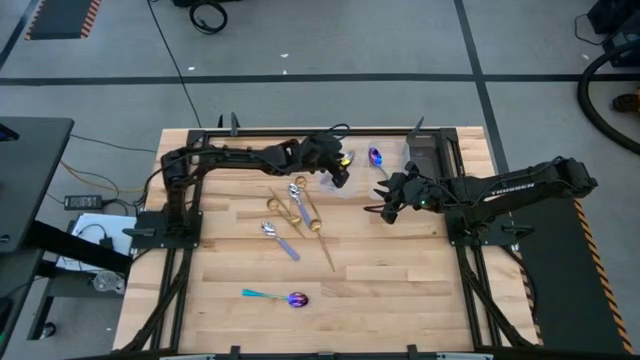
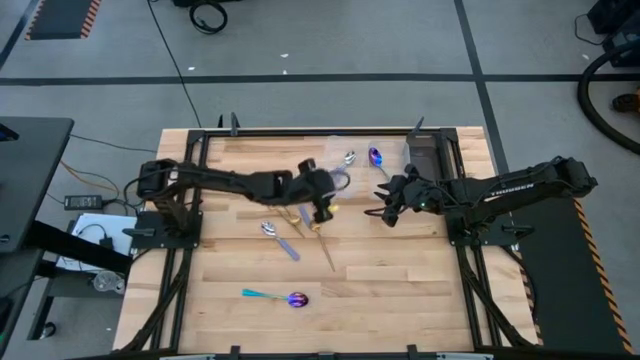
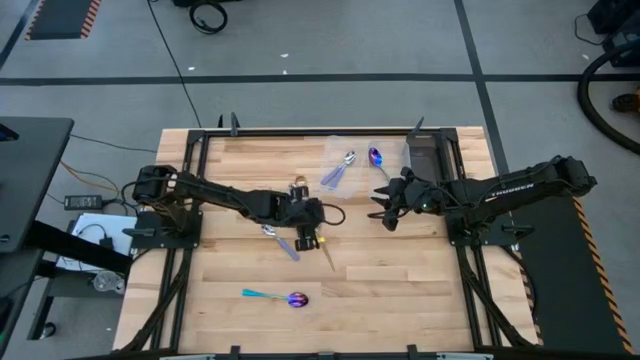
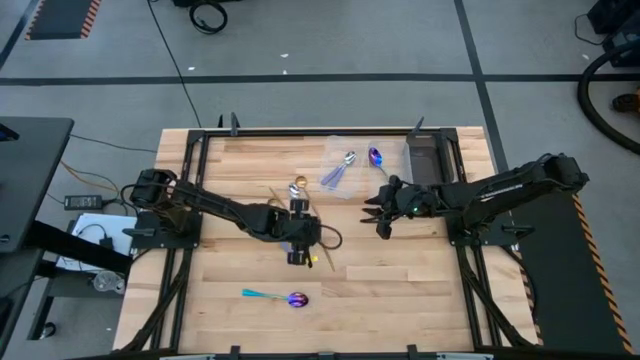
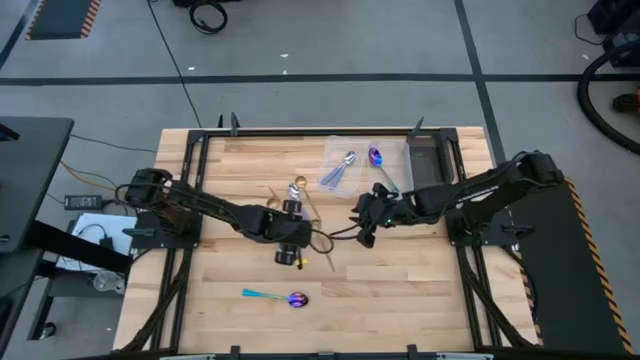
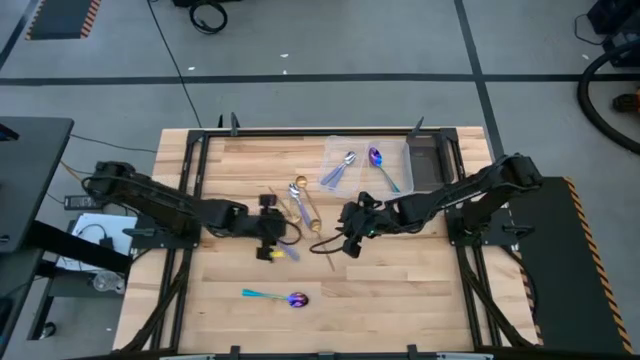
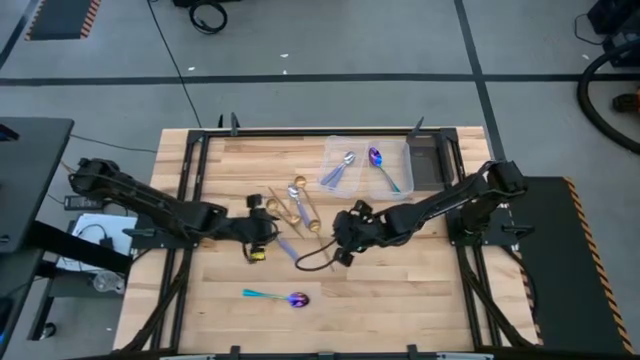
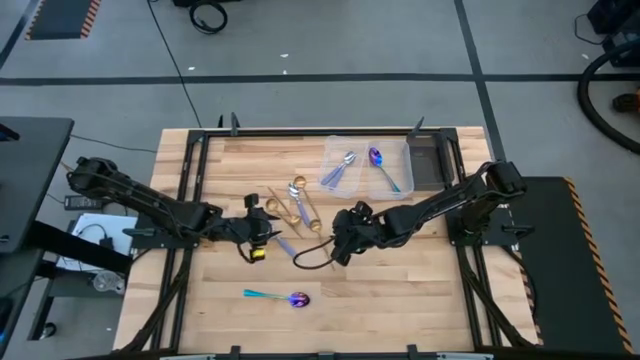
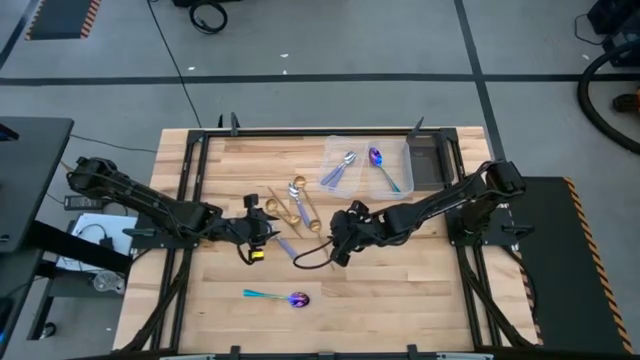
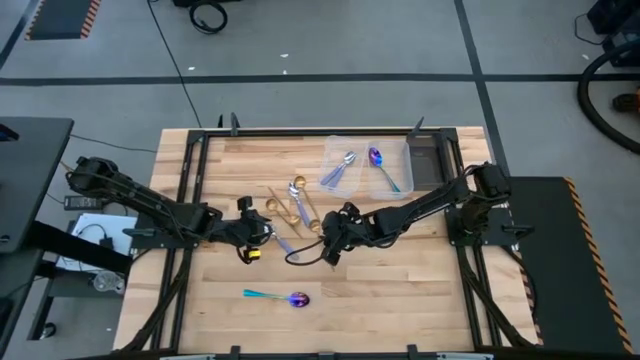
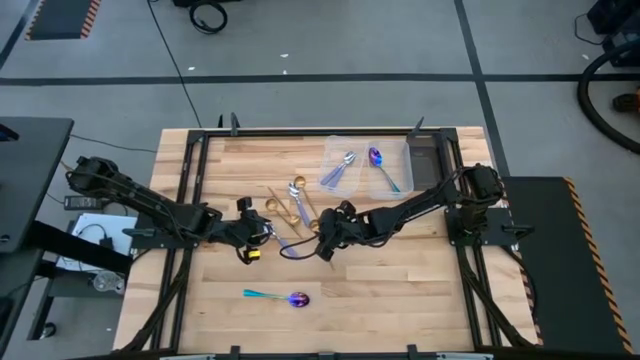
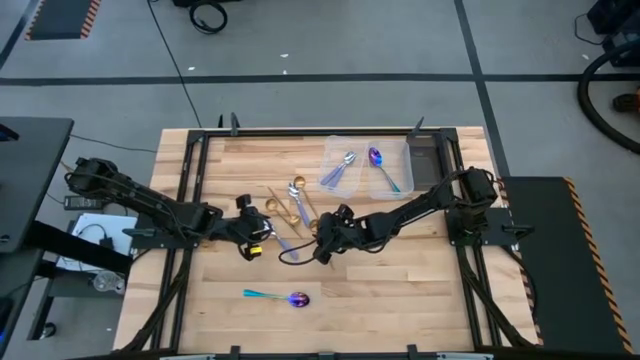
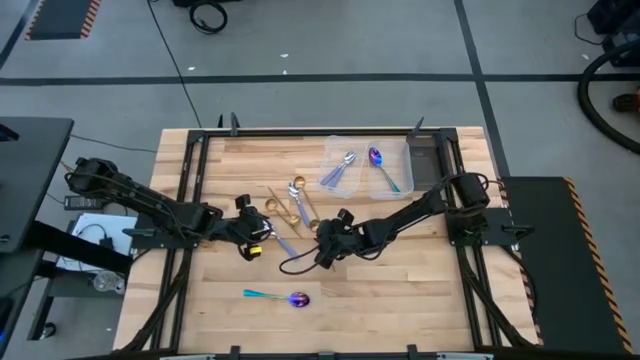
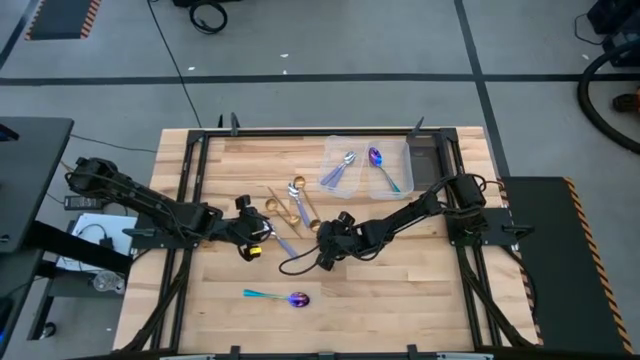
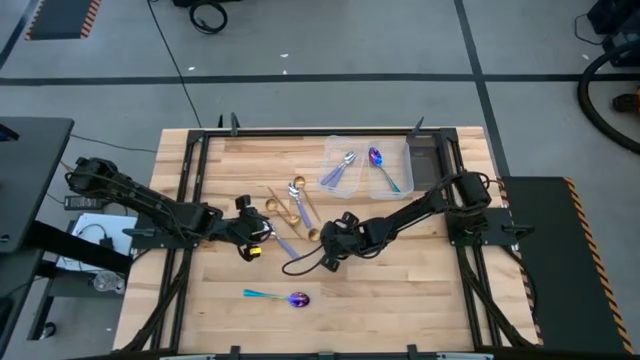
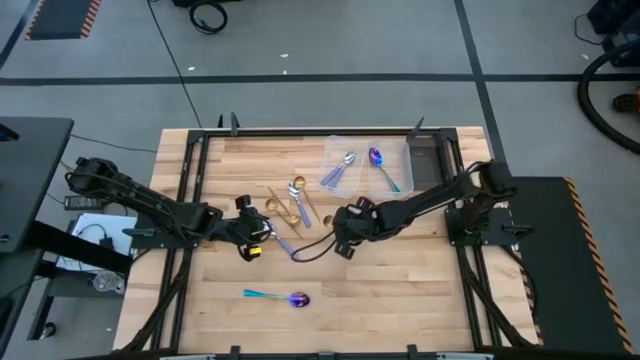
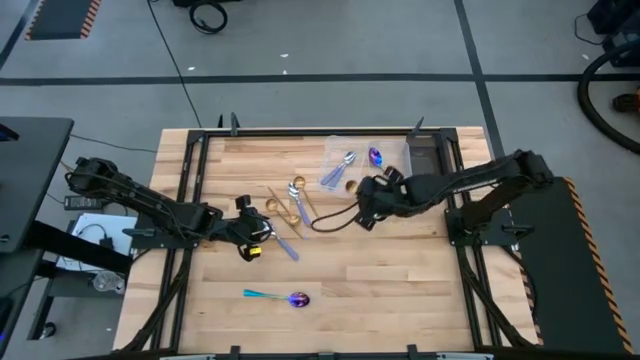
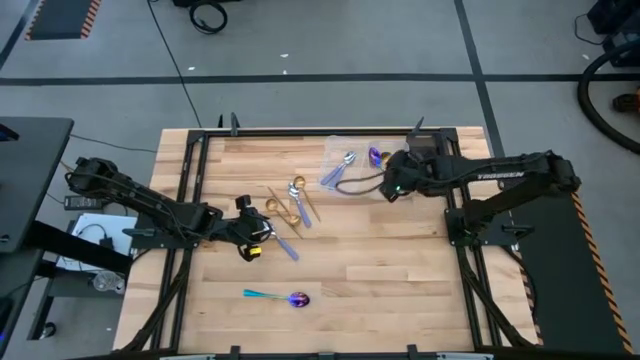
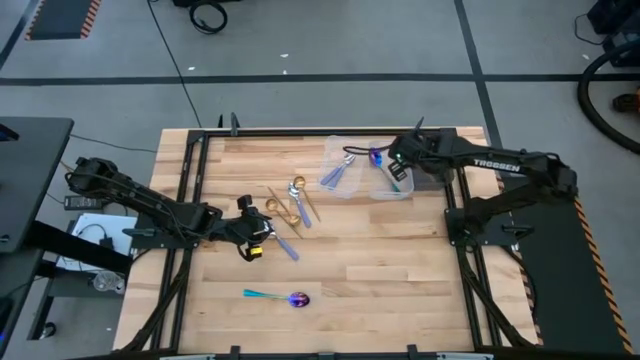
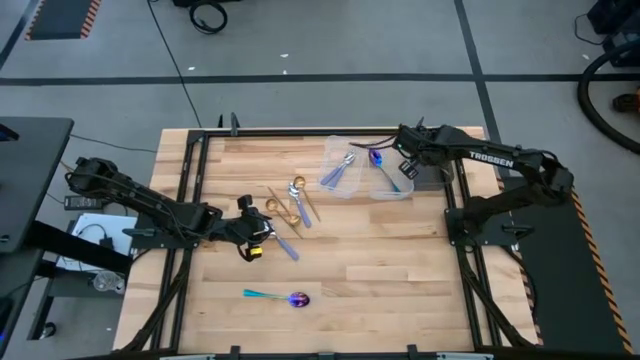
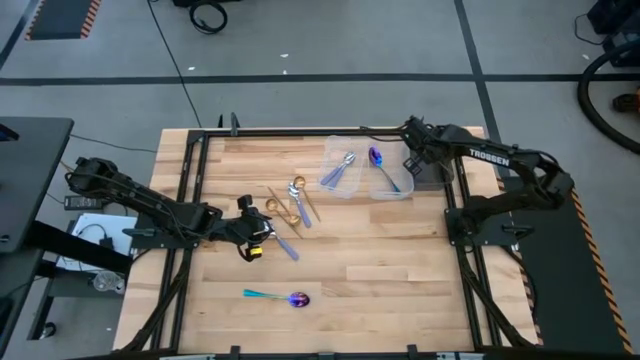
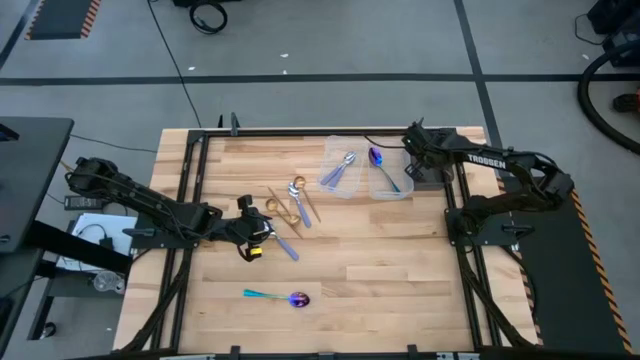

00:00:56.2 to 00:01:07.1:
Task: Sort silverware by color (type)
Put the bottom right golden spoon into the black bin

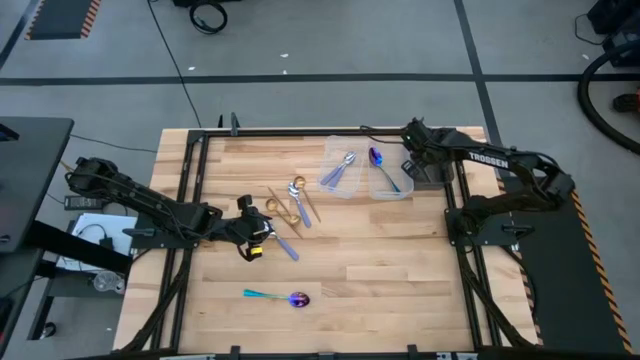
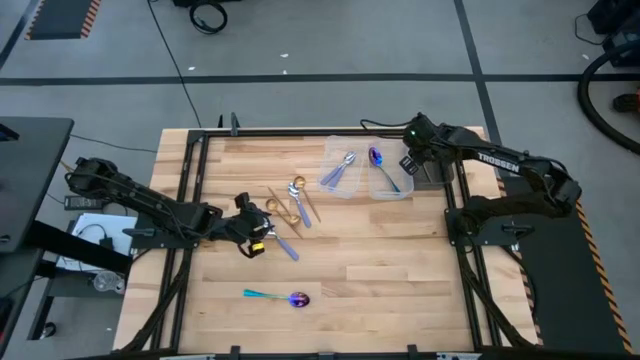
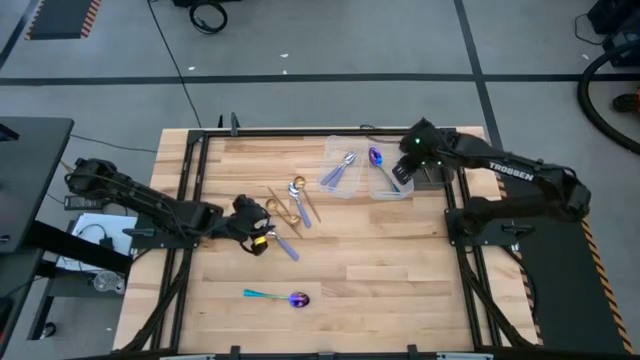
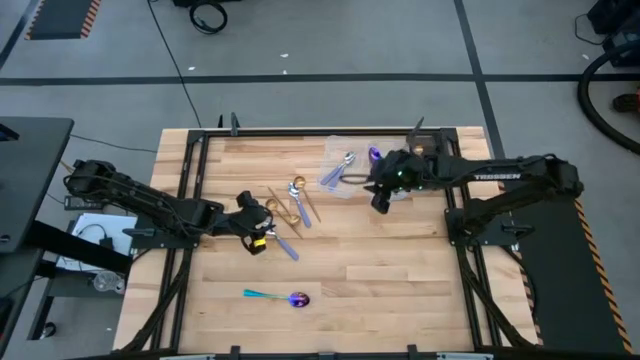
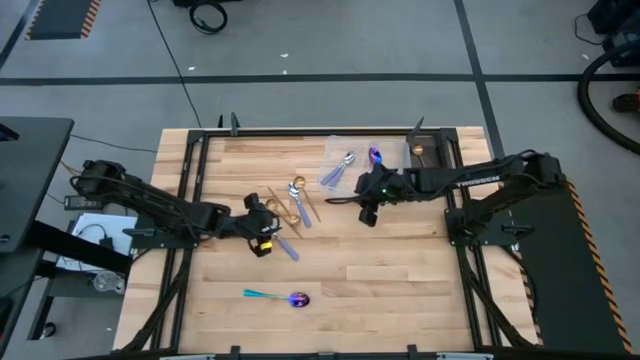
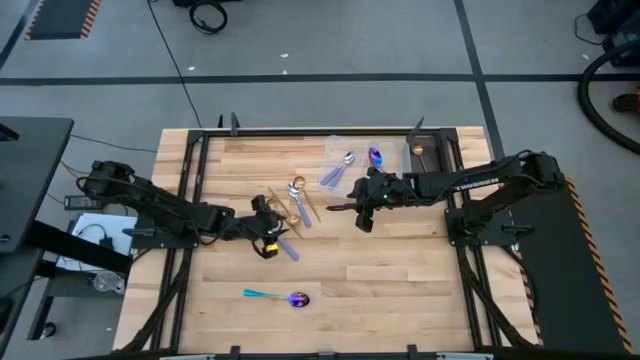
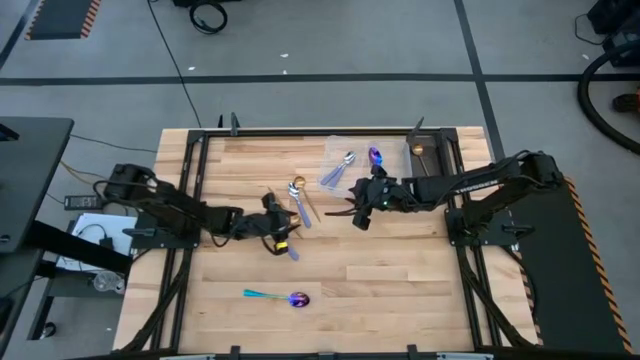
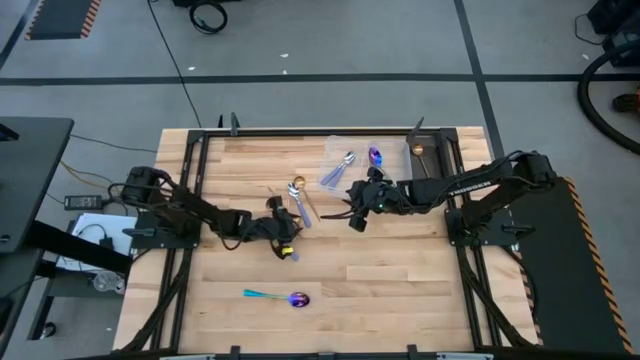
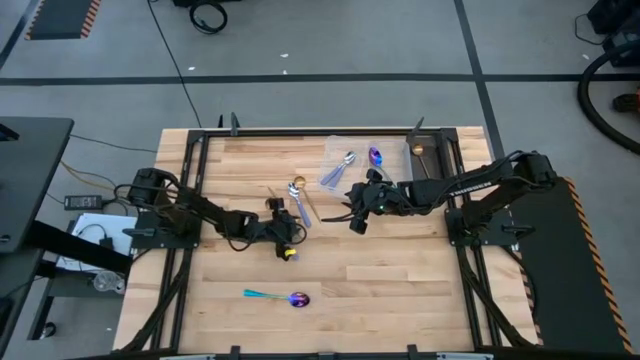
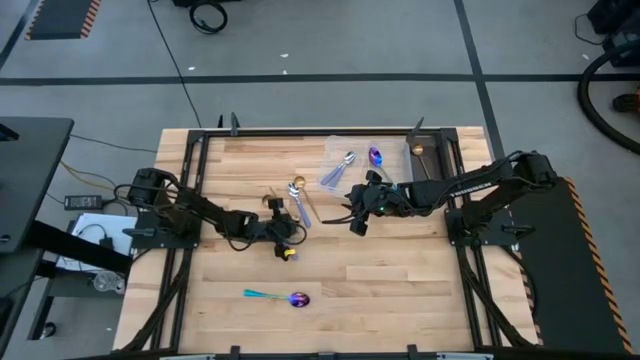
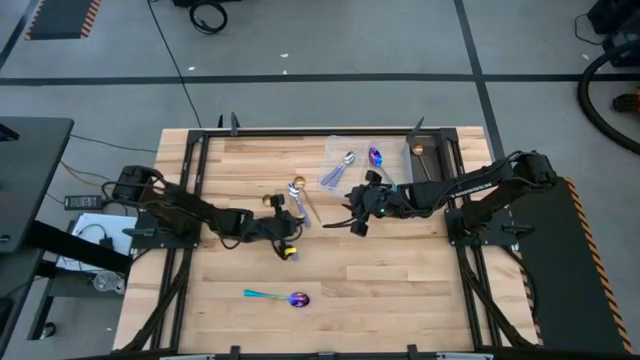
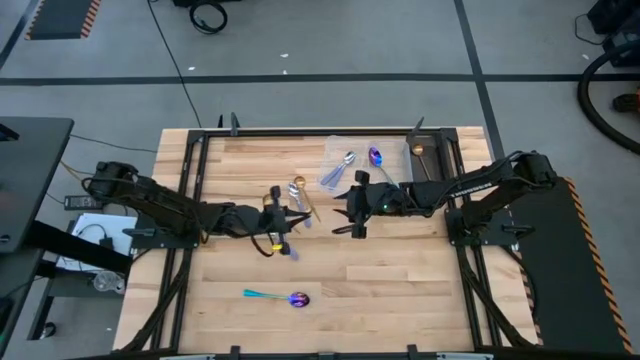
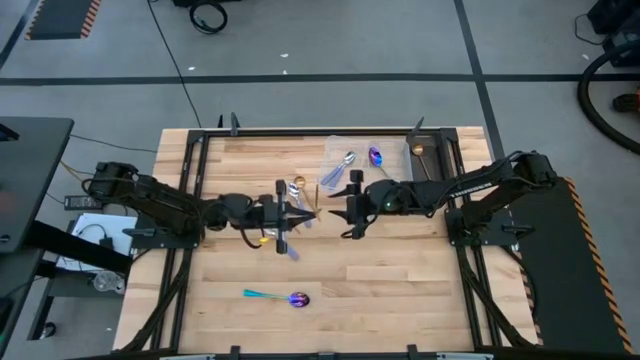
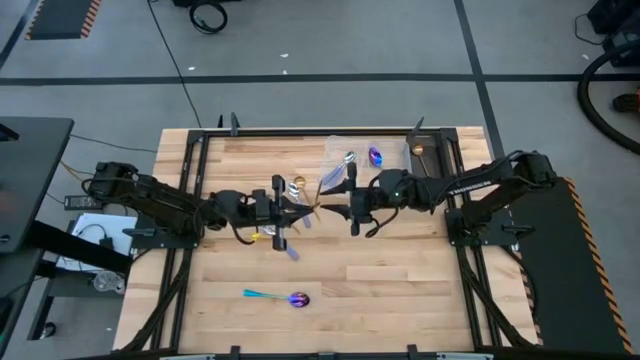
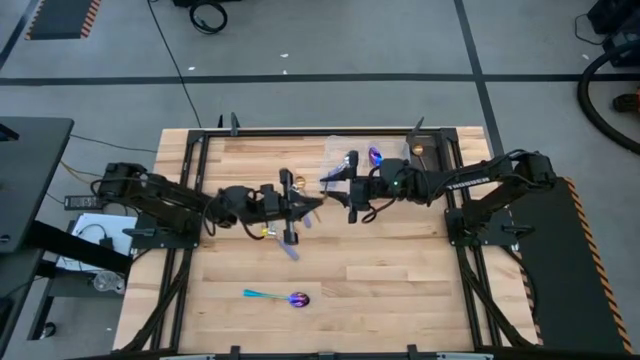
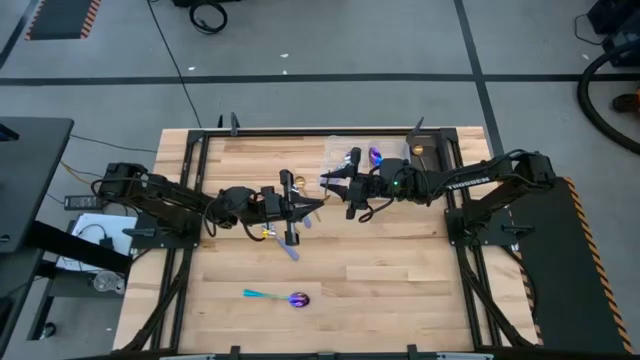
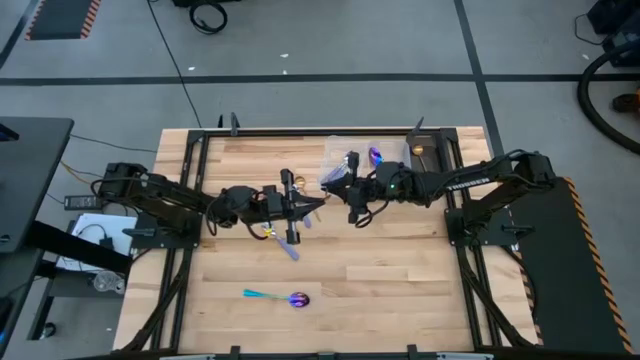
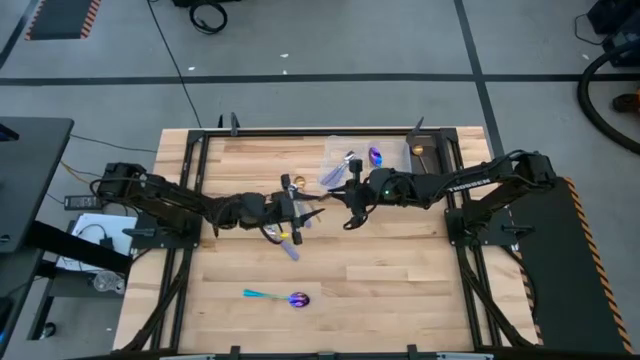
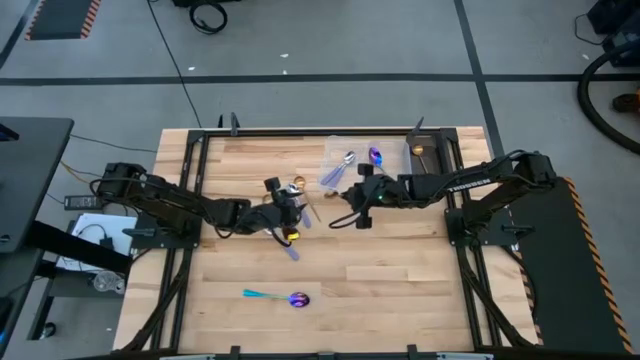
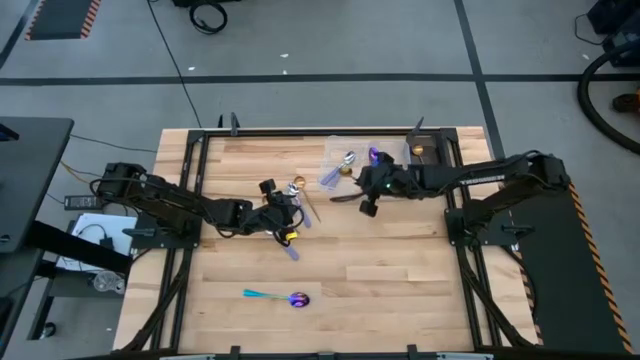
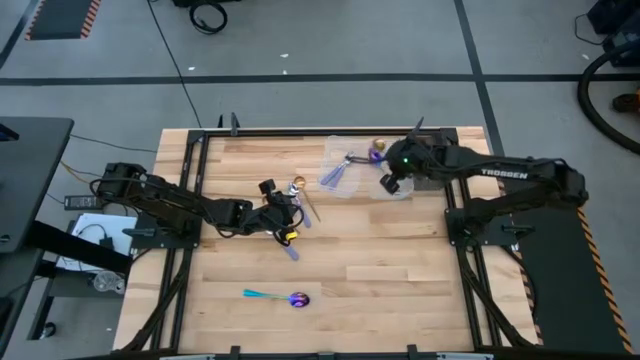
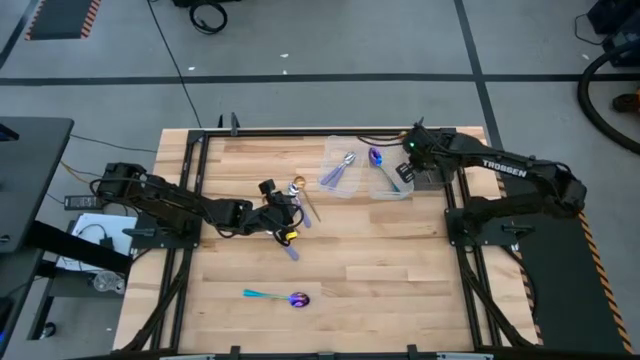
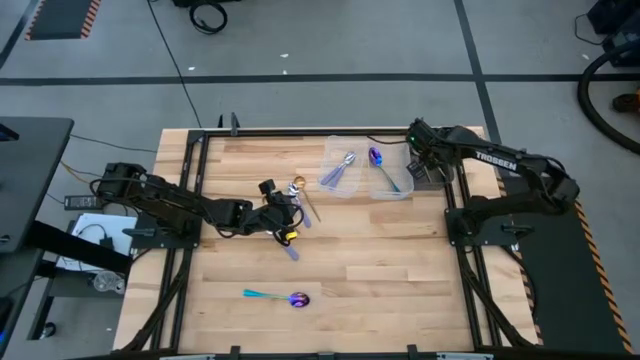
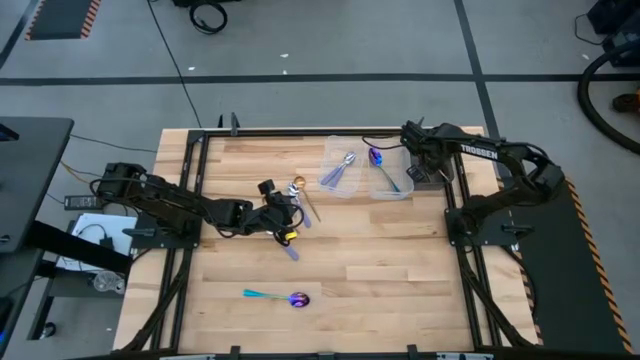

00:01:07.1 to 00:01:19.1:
Put the middle golden spoon into the black bin
